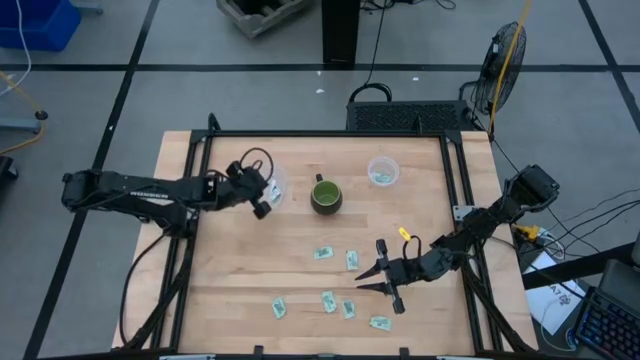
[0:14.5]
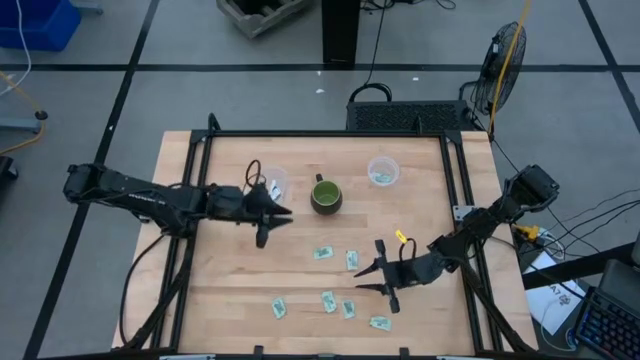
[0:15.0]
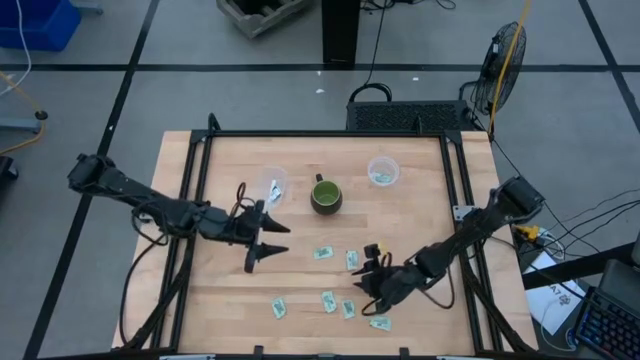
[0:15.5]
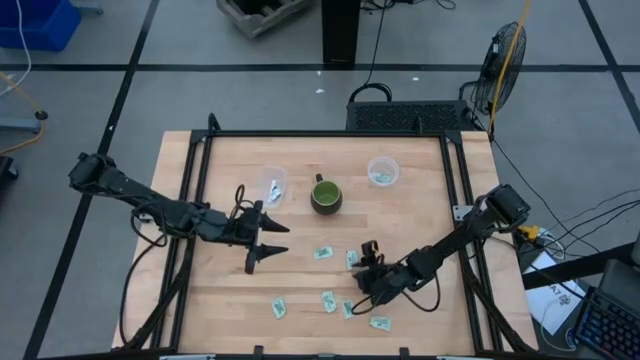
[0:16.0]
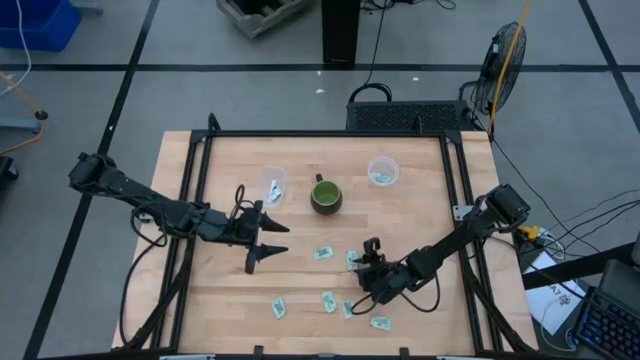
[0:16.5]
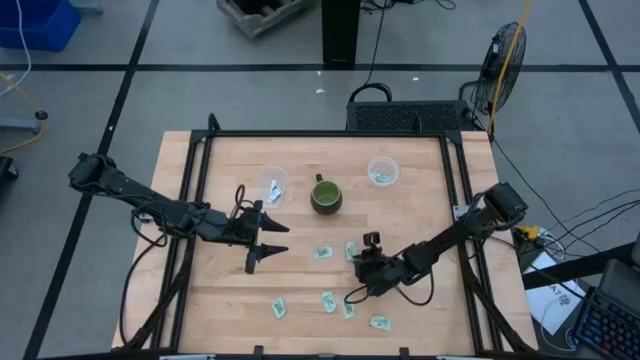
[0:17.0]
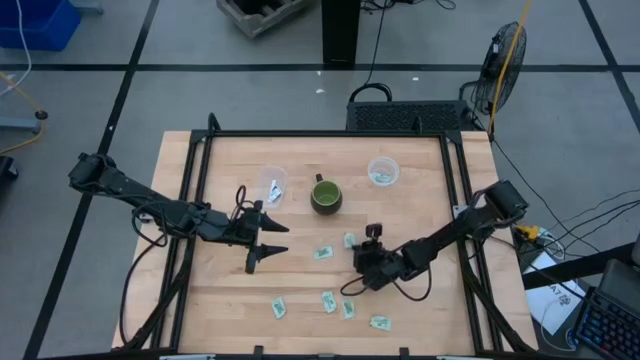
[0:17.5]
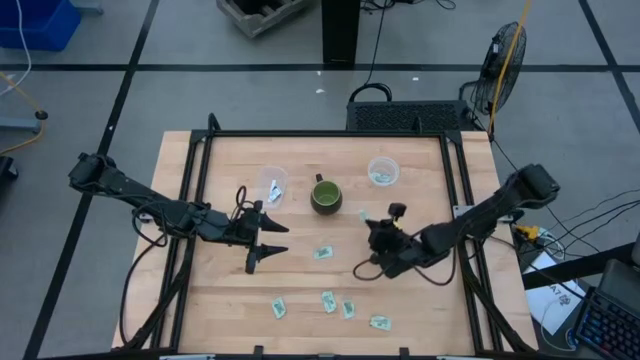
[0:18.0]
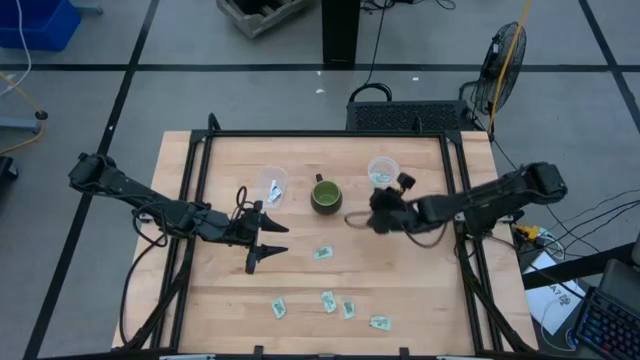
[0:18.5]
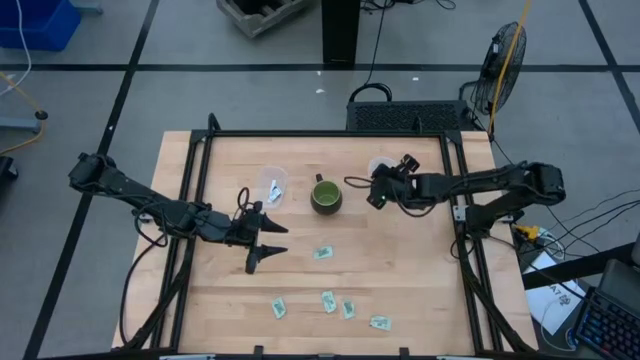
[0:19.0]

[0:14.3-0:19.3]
Task: Pick and place items into bin
Put the green stevia packet into the right transparent bin

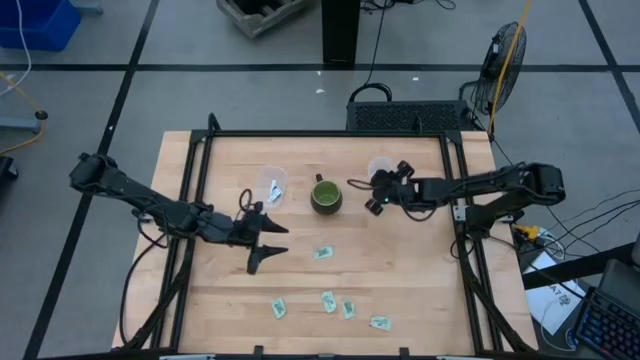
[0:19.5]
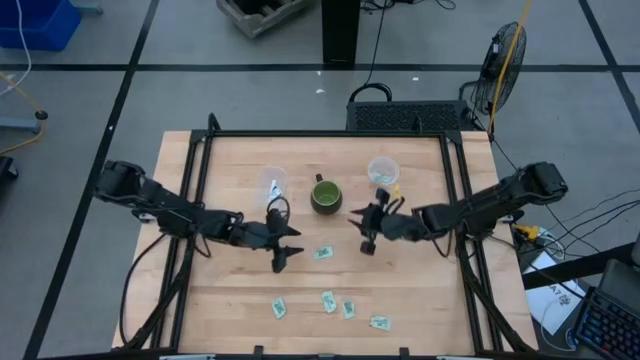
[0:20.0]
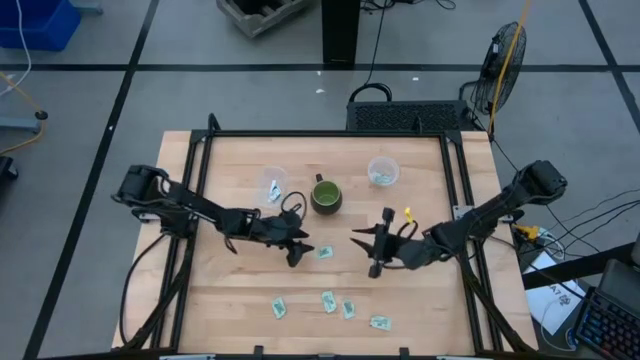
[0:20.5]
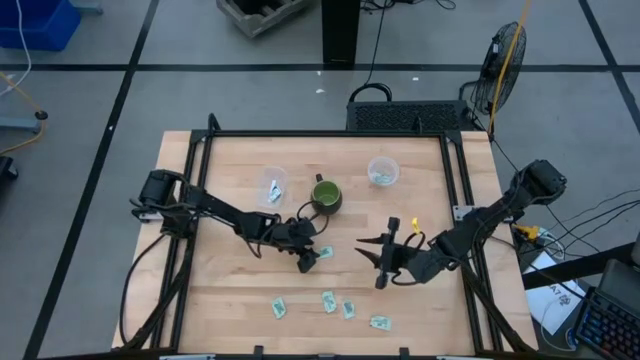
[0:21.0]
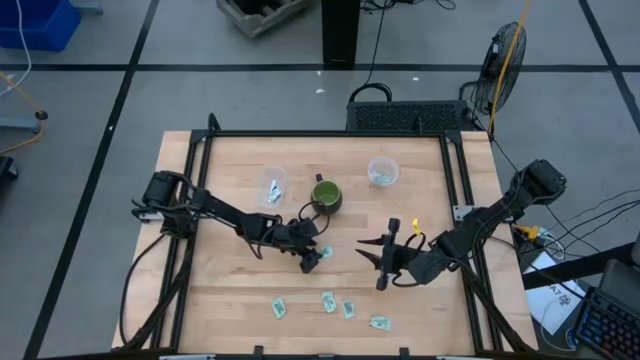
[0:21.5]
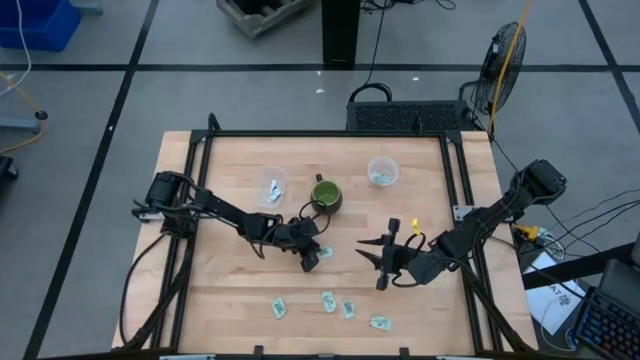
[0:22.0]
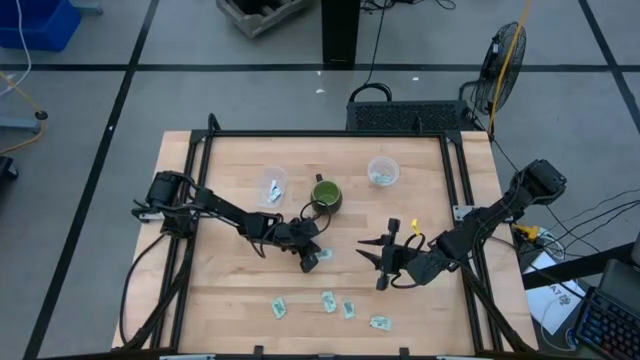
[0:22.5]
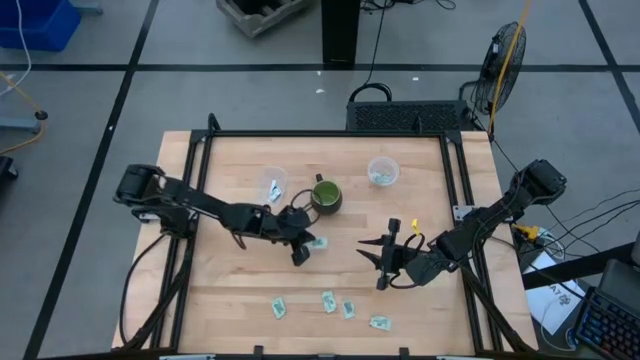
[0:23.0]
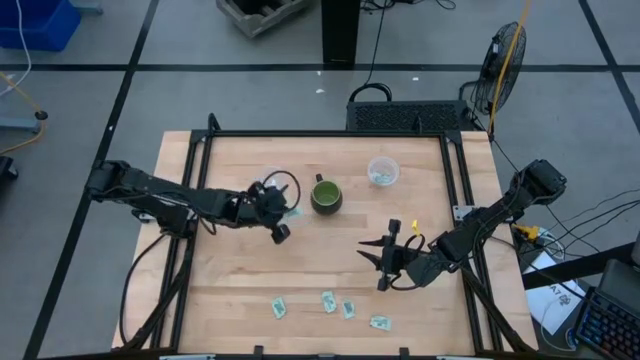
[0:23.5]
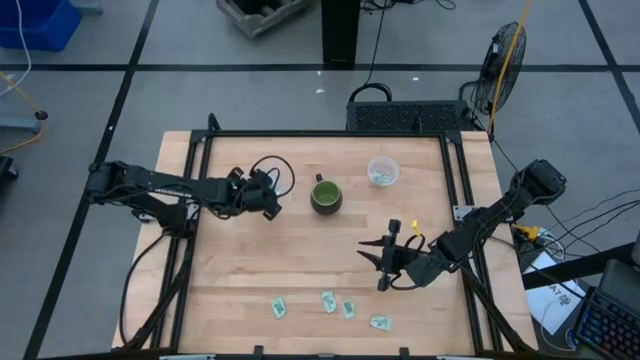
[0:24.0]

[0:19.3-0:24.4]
Put the green stevia packet into the left transparent bin

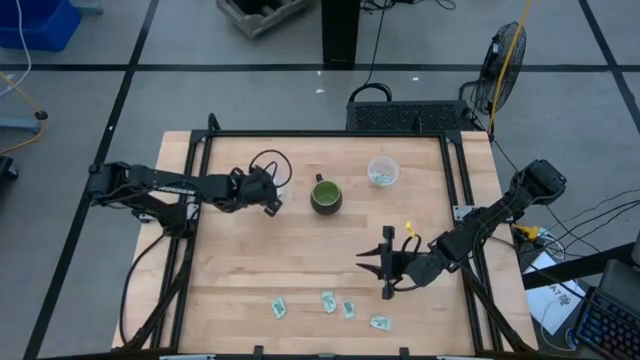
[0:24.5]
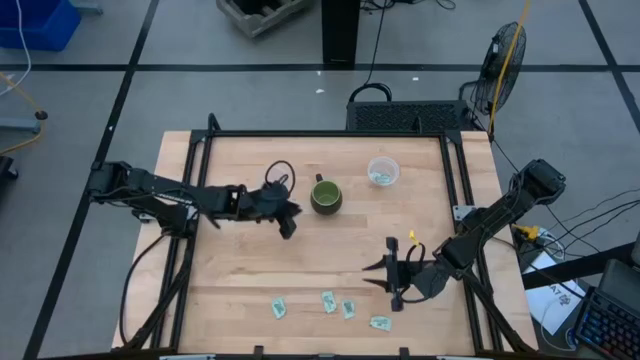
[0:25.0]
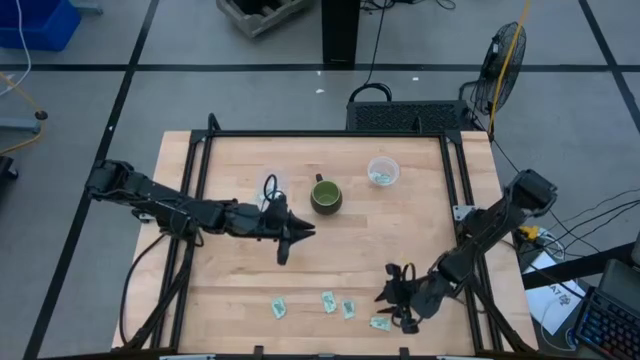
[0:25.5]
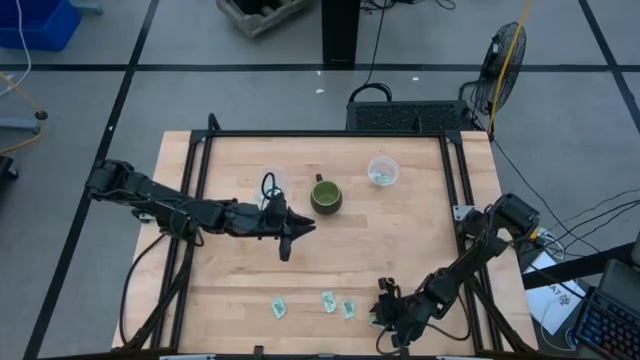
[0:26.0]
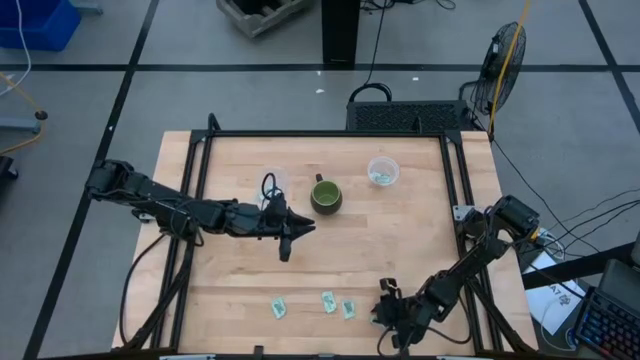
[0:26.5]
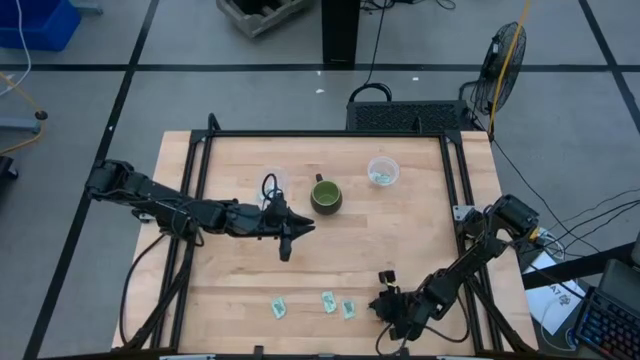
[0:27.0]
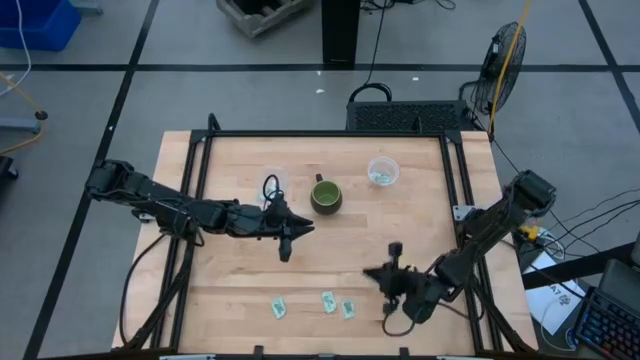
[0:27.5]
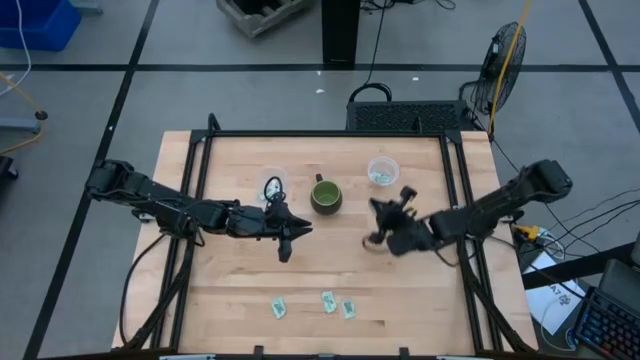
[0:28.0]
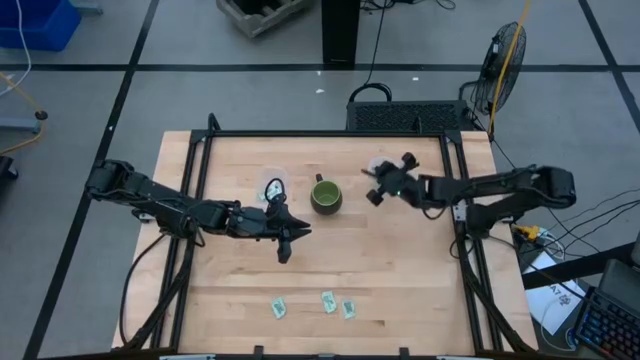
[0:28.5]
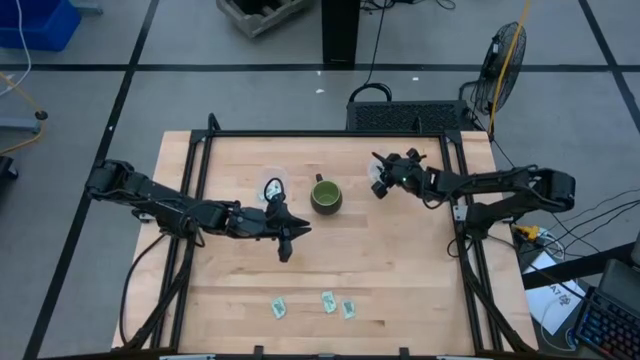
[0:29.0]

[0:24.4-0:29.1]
Put the green stevia packet into the right transparent bin

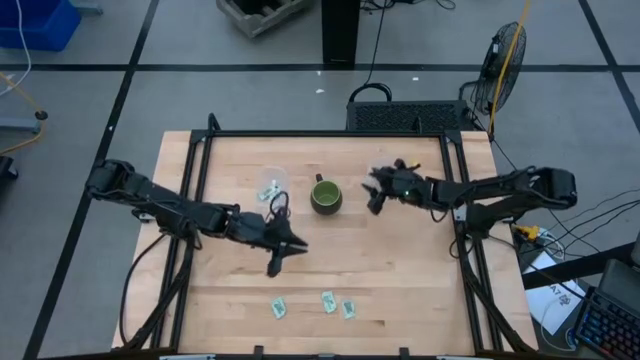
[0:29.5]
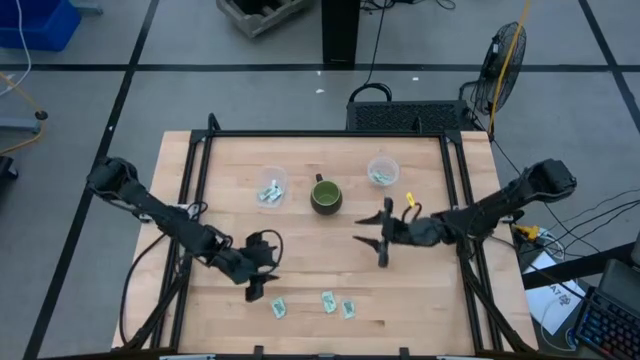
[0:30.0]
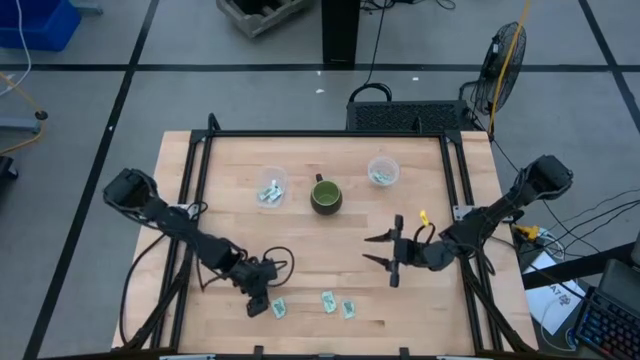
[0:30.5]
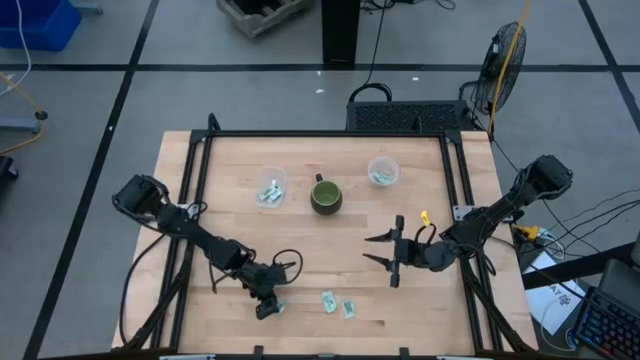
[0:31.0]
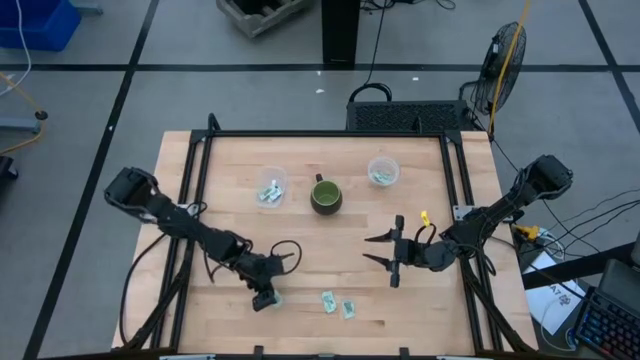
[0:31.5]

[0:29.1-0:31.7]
Put the green stevia packet into the left transparent bin

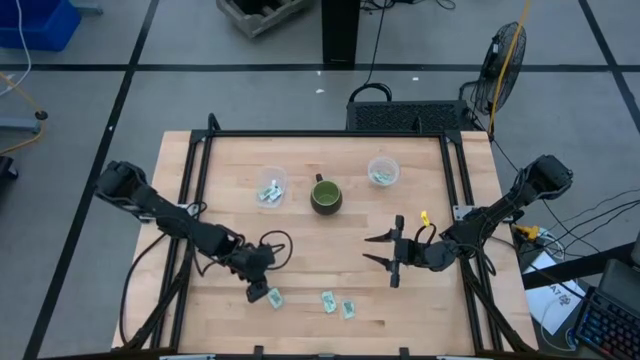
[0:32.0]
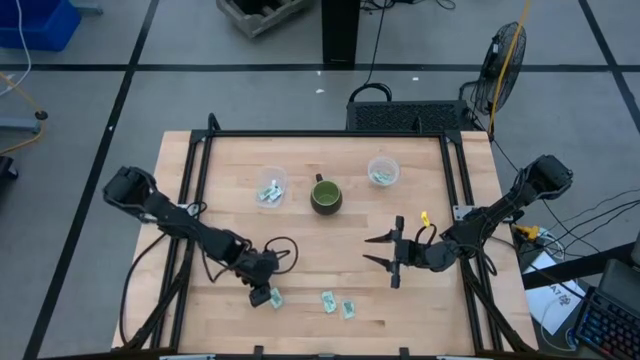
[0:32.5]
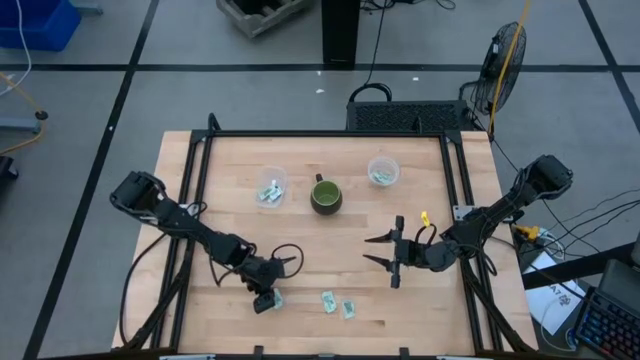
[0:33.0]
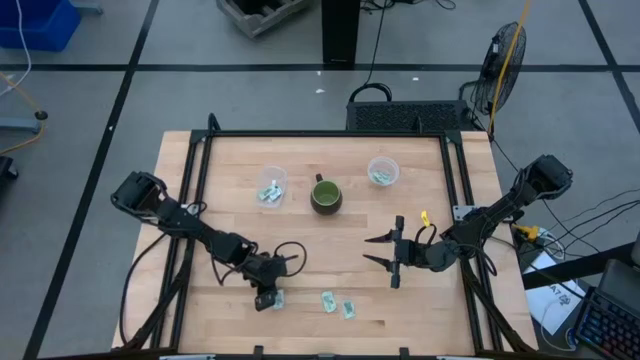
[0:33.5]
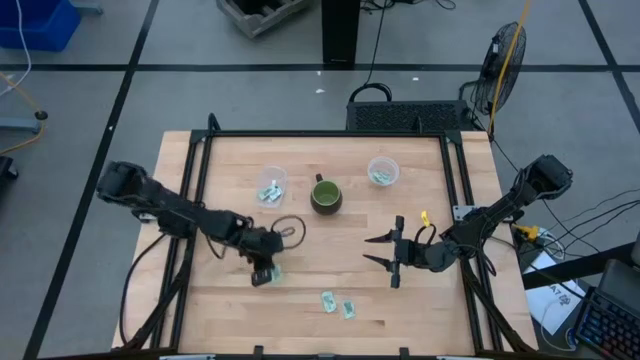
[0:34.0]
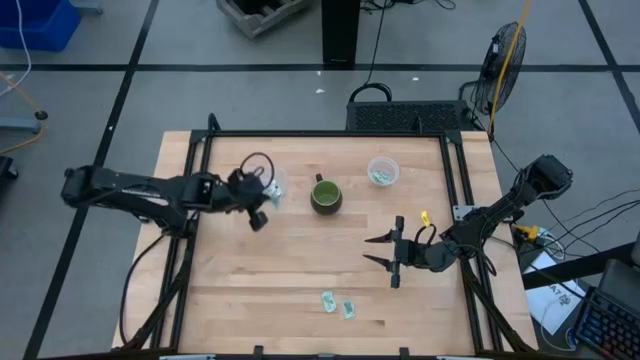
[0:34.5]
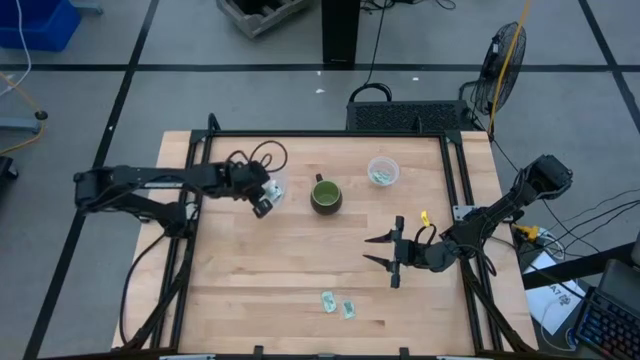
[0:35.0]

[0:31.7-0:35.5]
Put the green stevia packet into the left transparent bin

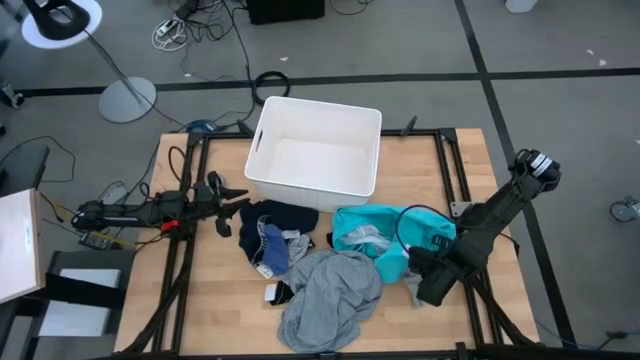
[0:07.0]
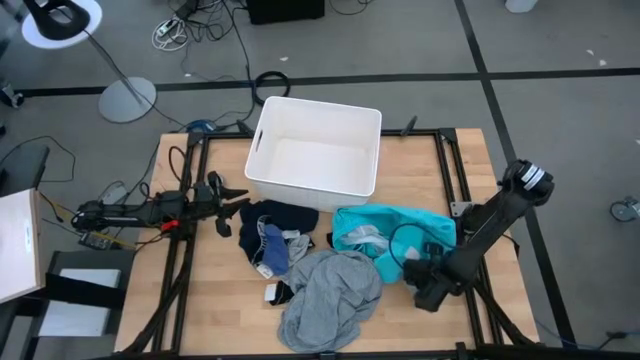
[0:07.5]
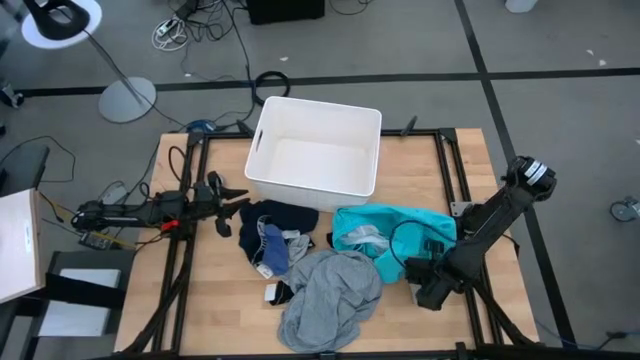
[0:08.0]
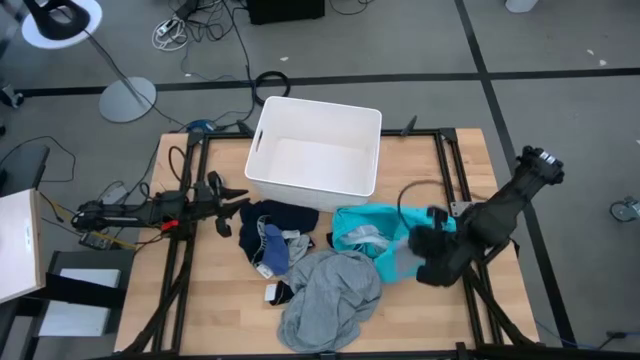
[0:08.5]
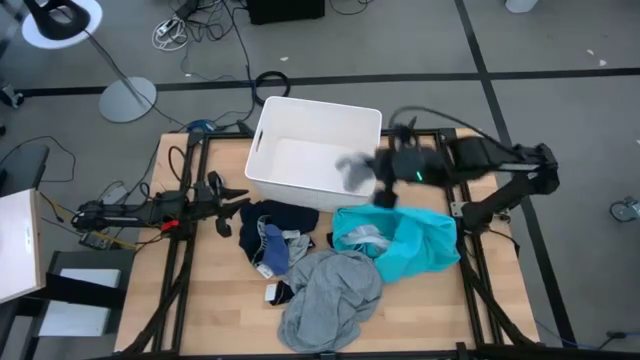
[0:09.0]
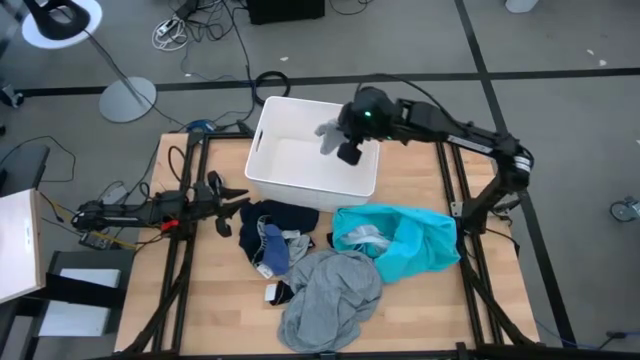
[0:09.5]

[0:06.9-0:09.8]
Task: Sort clothes
Put the gray sock into the laundry bin
